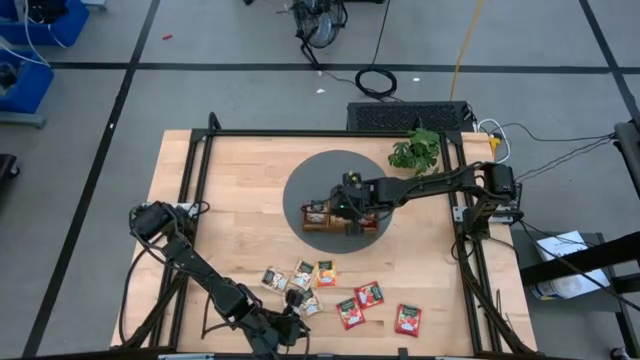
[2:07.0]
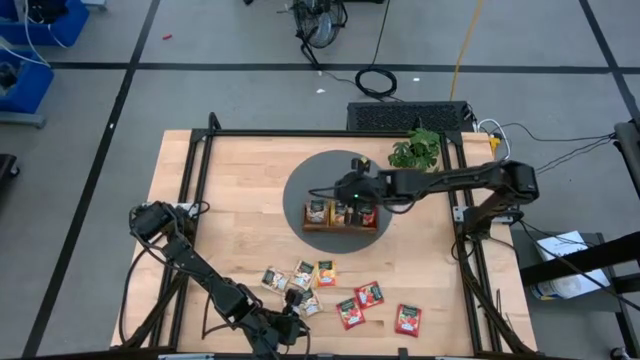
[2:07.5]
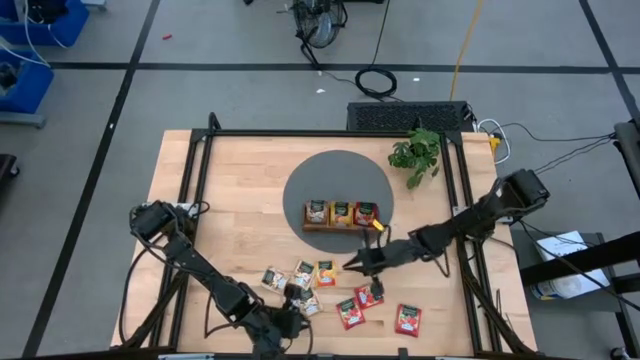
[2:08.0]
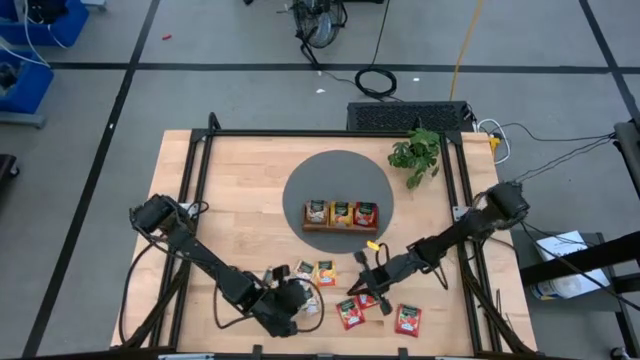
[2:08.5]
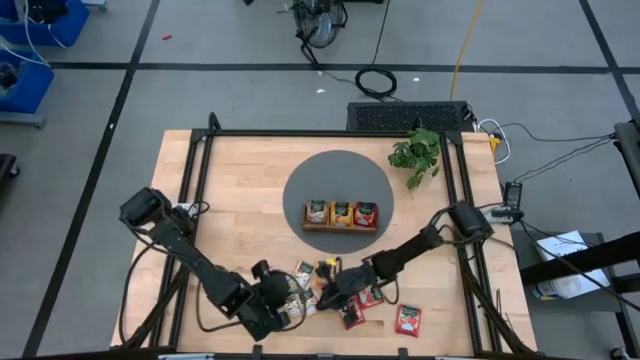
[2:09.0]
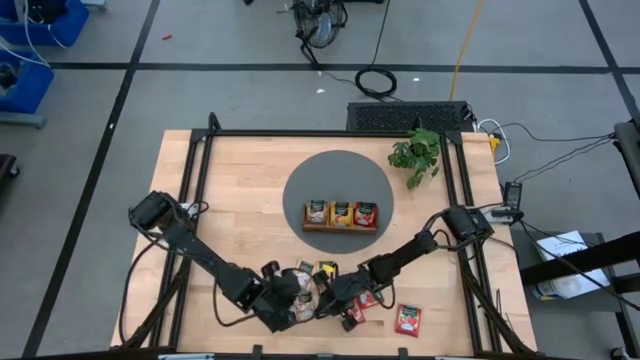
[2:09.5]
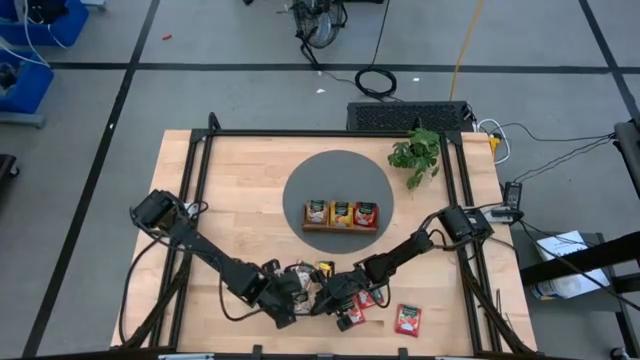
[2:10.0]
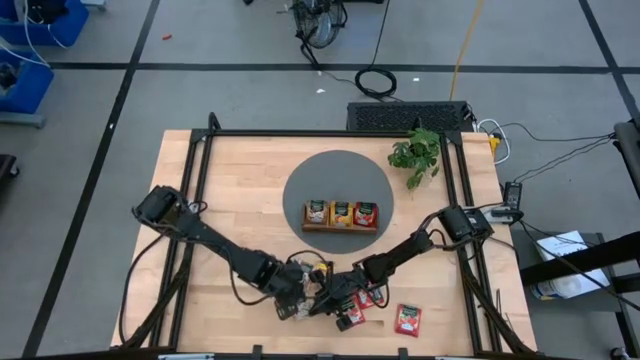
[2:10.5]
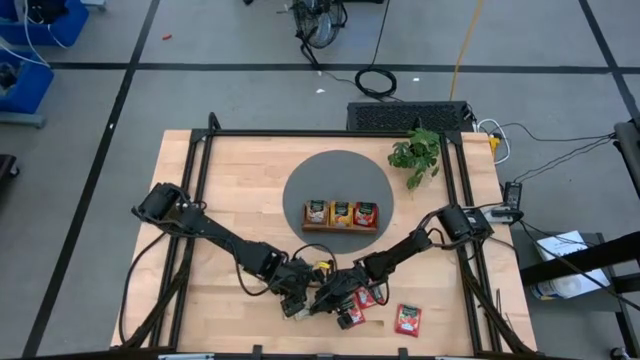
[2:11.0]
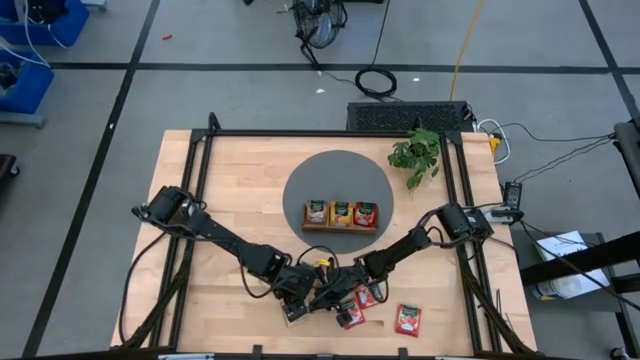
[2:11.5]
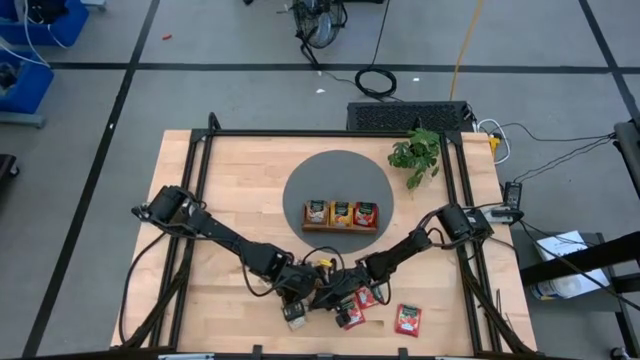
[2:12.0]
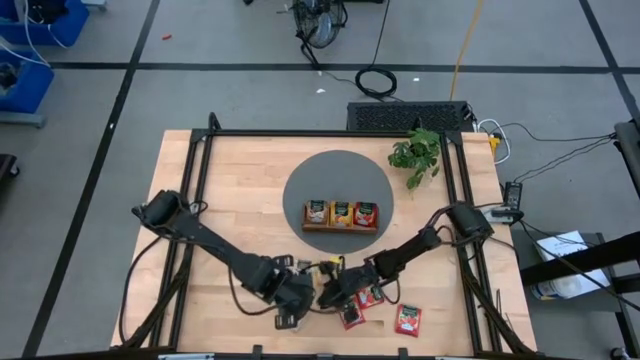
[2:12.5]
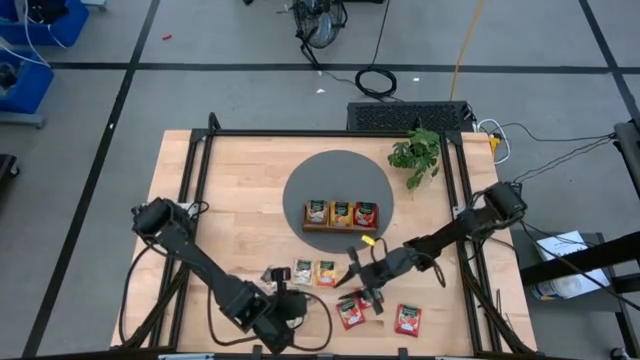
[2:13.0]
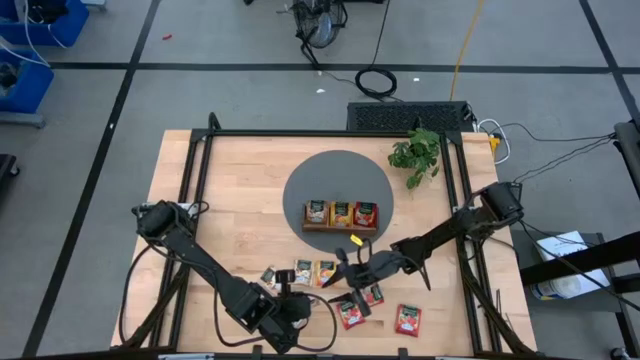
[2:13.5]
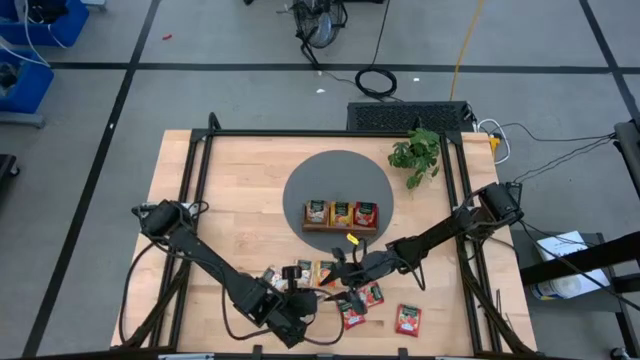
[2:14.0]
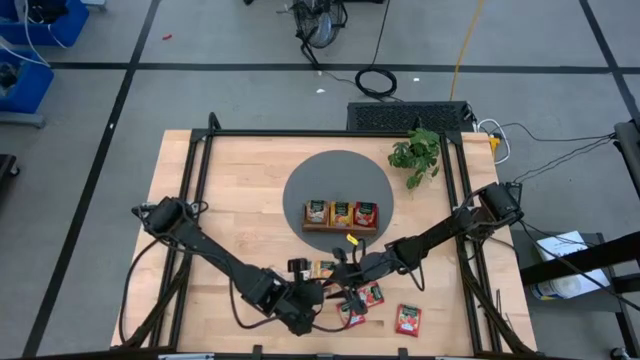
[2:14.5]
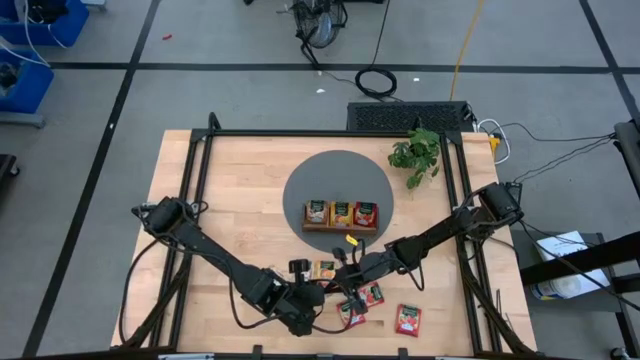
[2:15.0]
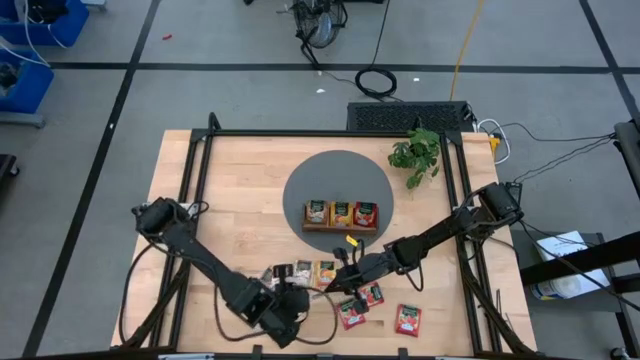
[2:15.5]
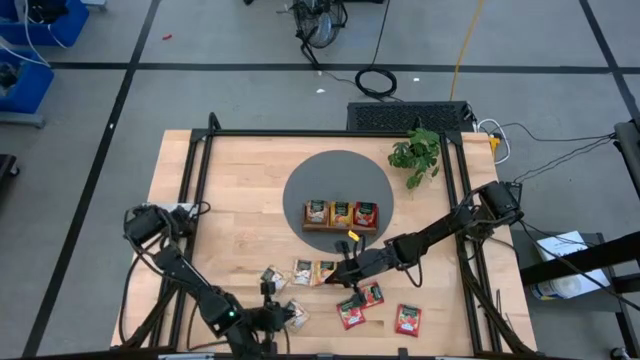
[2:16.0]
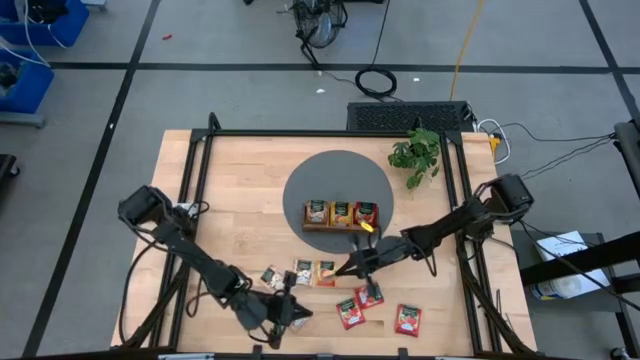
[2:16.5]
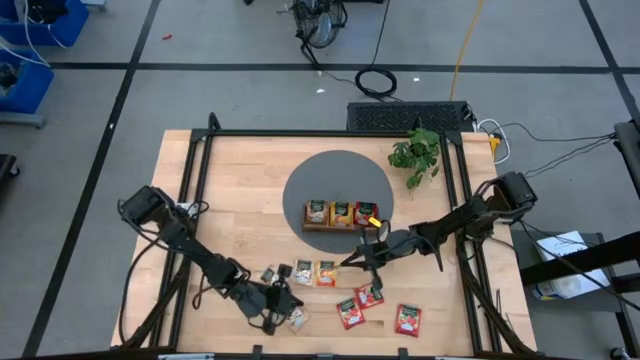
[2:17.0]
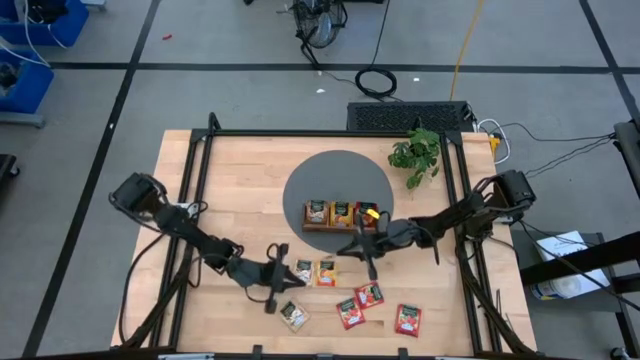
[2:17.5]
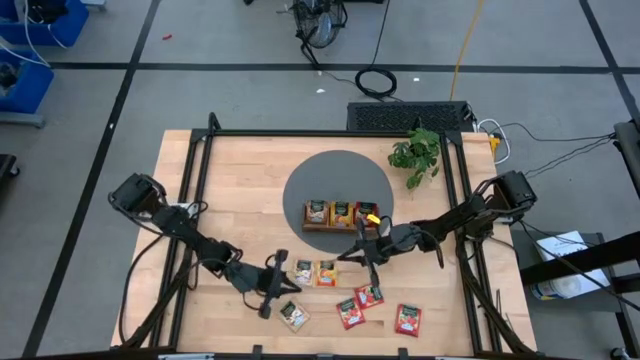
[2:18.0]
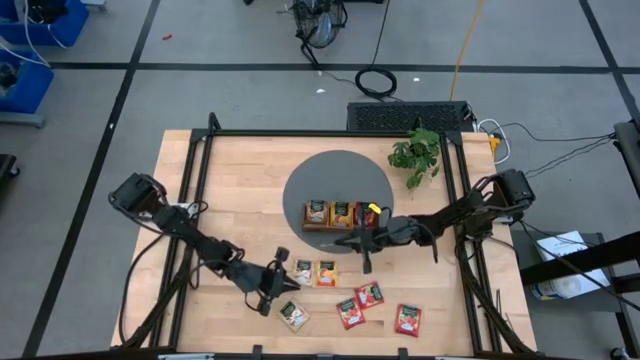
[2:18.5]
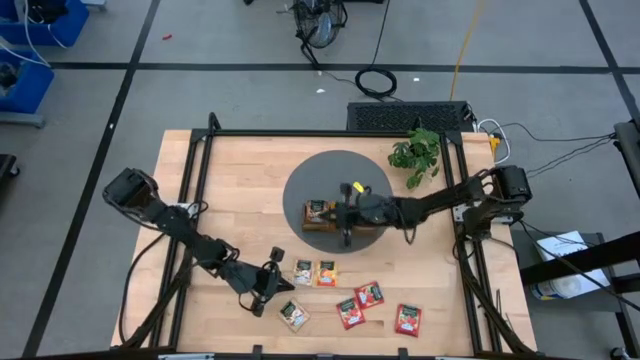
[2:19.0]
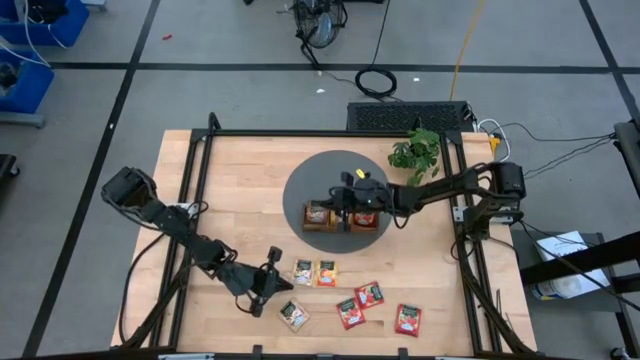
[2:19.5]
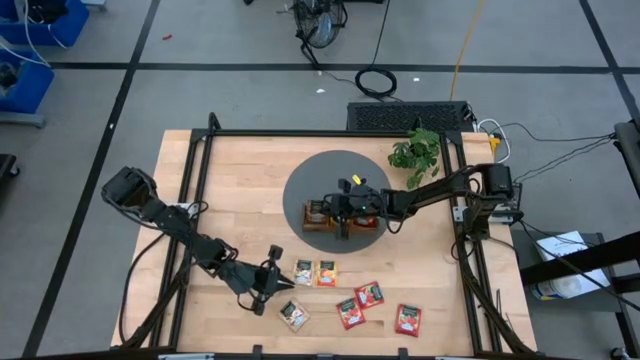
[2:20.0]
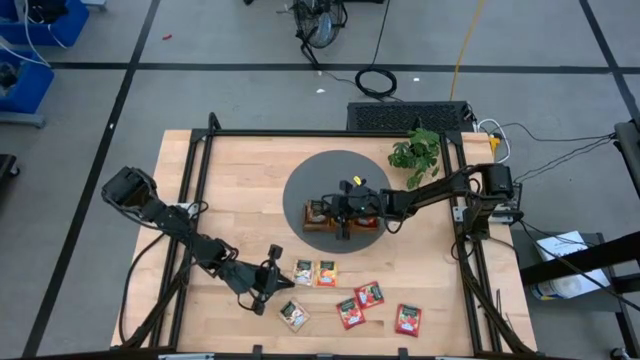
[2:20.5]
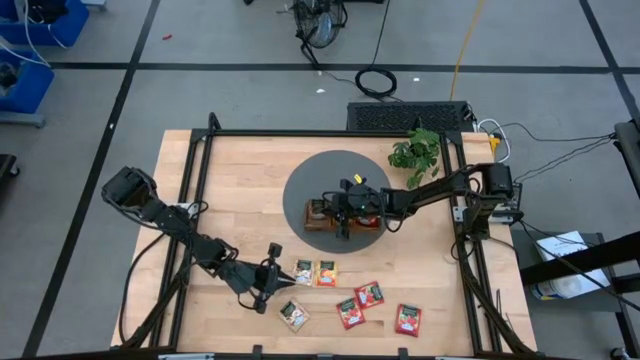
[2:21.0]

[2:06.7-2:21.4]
Task: Pick & Place Tea
Put the brown tea bag into the left slot of the wooden organizer

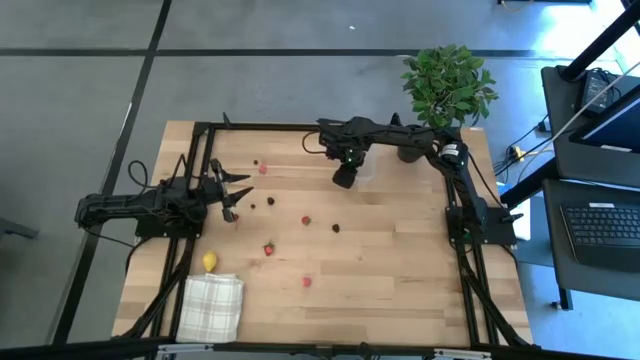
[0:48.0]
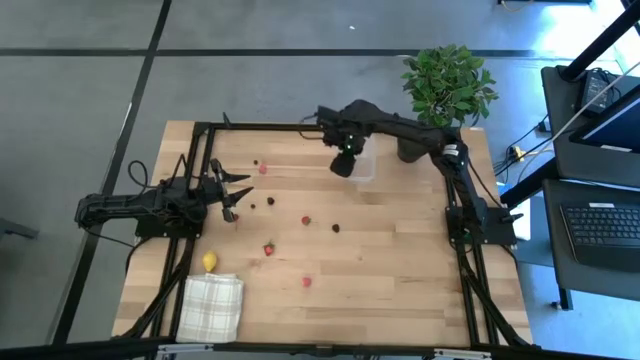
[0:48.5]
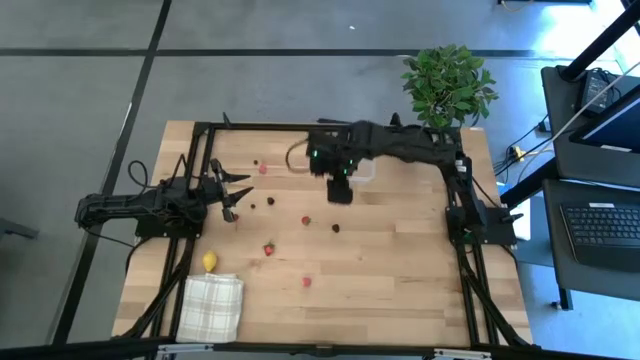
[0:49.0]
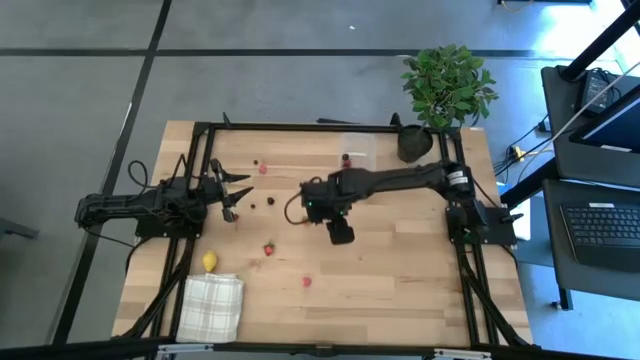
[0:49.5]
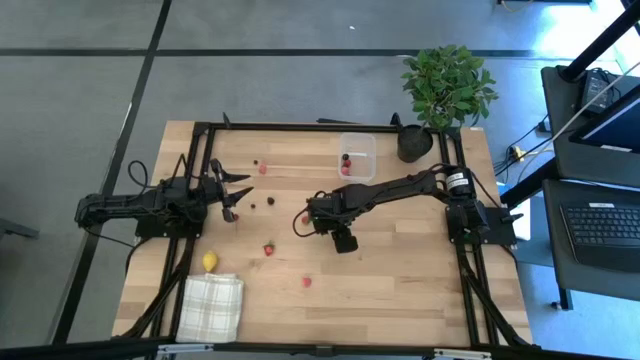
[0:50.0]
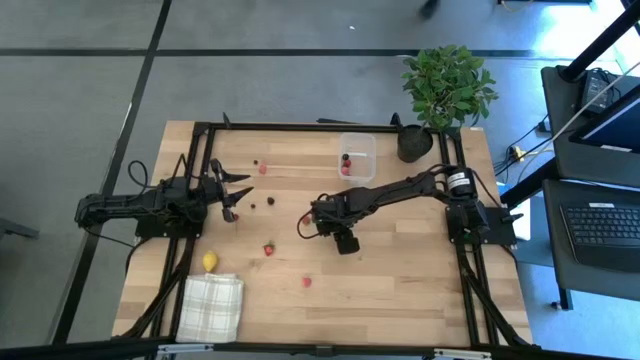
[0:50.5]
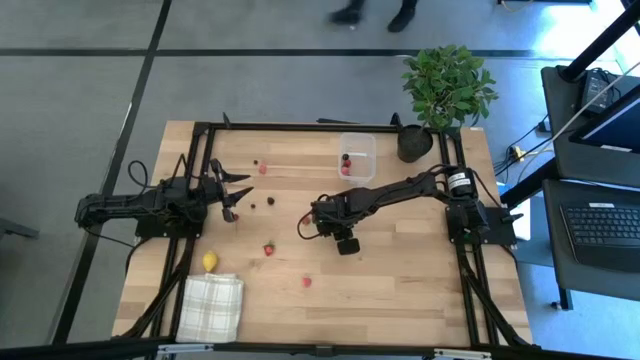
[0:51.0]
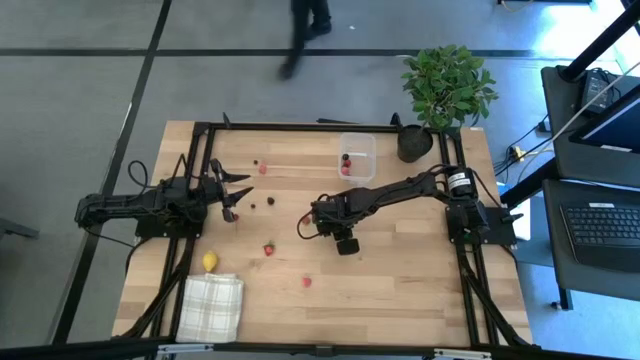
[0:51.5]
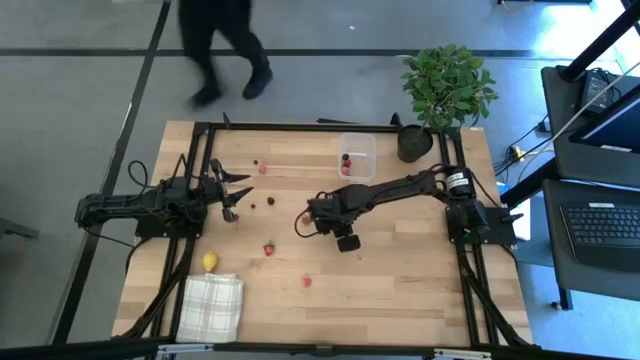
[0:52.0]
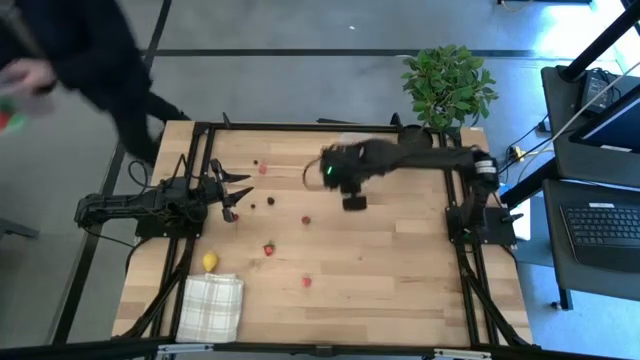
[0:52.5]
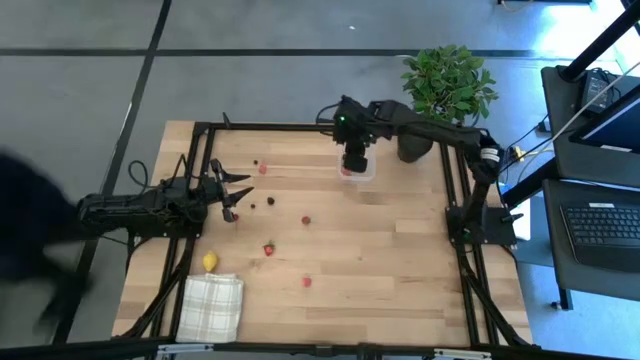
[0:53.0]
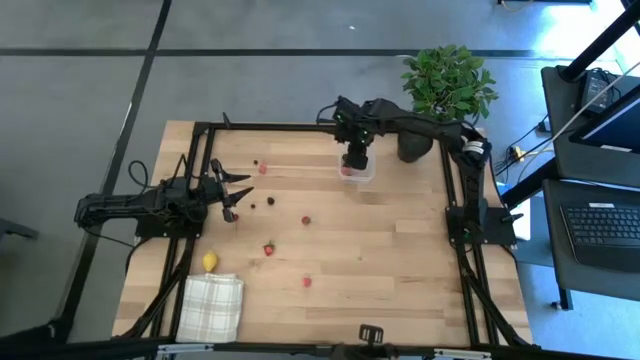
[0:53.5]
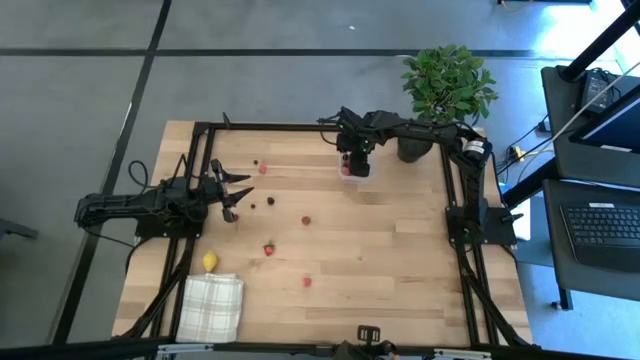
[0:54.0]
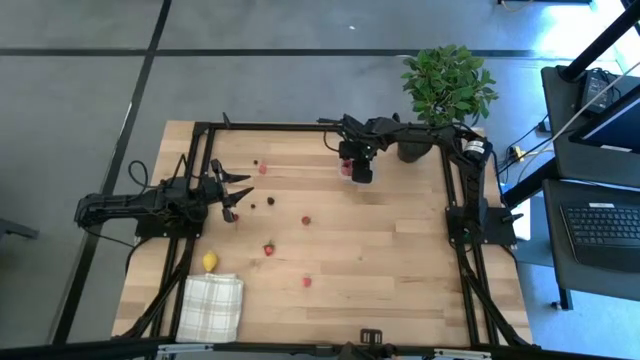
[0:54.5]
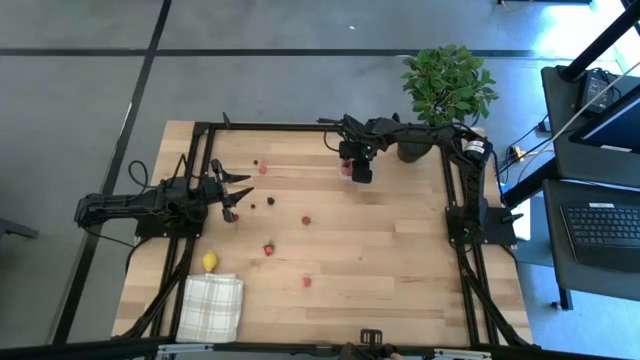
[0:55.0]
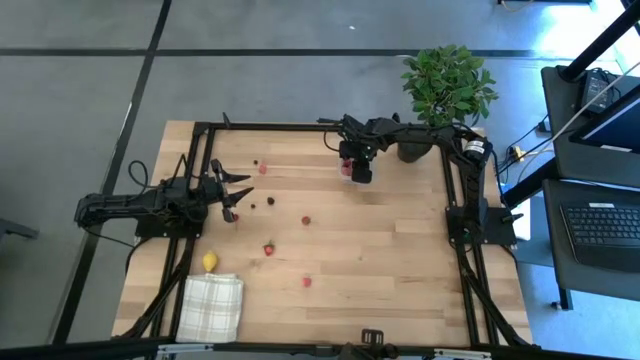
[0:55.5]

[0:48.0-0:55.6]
Task: Pick and placing Produce into tupperware
Put the right blackberry into the transparent bin
